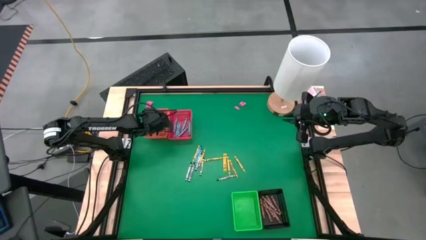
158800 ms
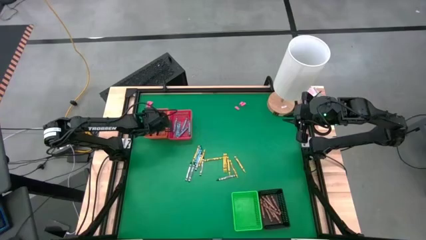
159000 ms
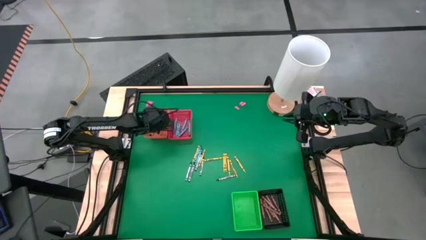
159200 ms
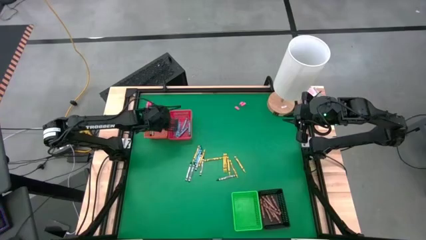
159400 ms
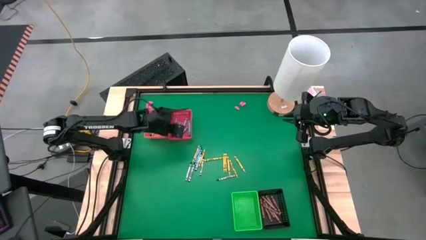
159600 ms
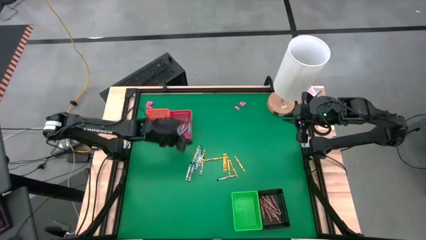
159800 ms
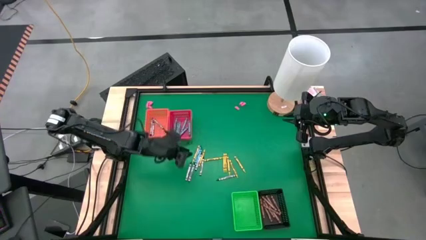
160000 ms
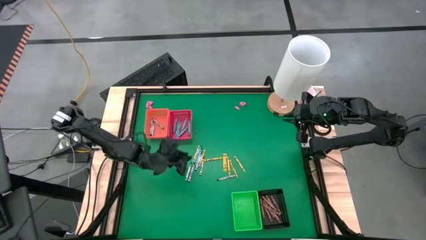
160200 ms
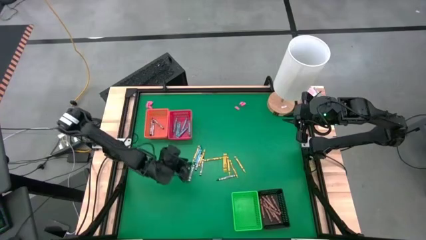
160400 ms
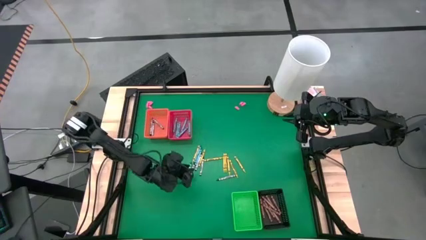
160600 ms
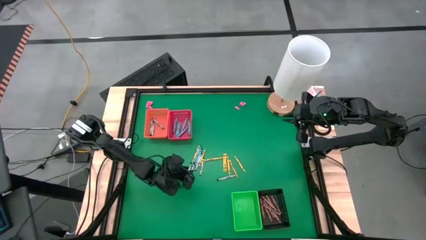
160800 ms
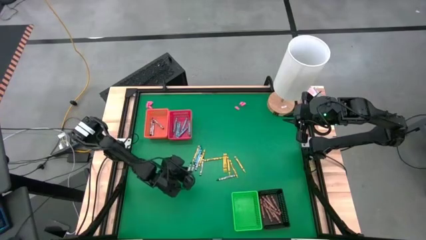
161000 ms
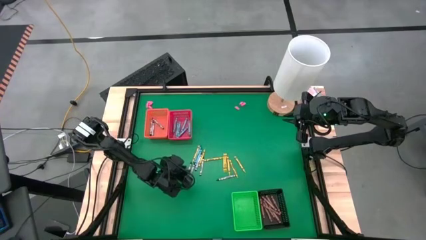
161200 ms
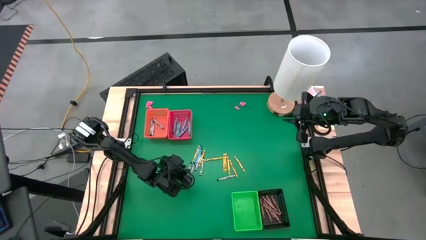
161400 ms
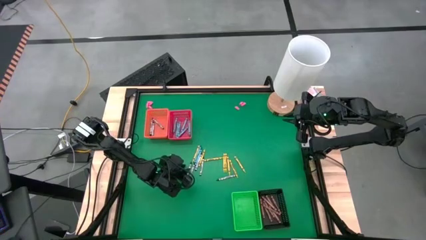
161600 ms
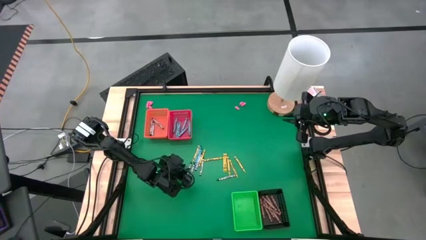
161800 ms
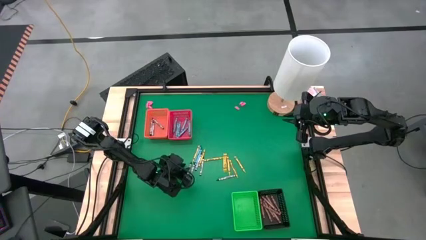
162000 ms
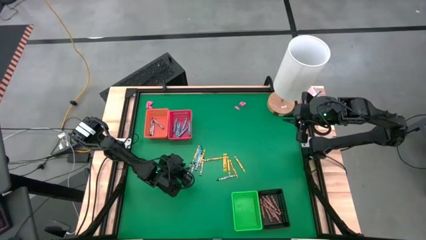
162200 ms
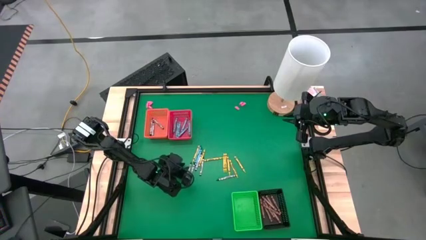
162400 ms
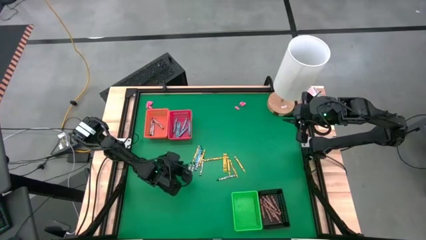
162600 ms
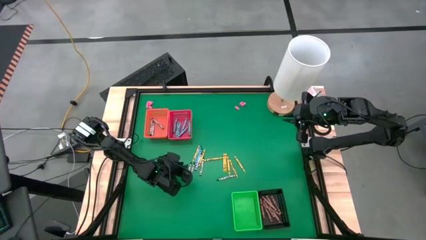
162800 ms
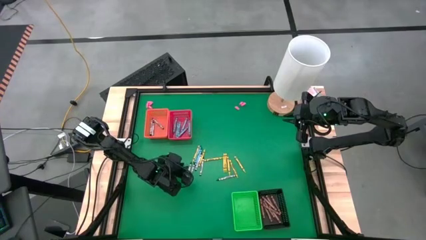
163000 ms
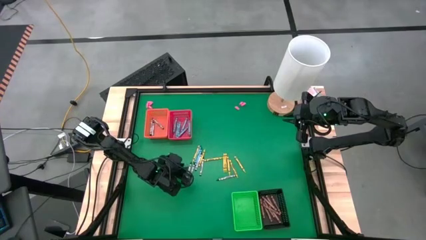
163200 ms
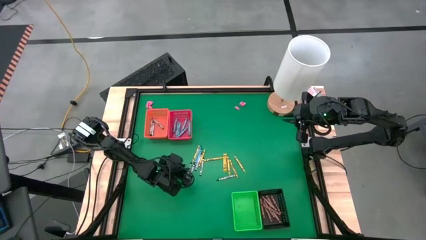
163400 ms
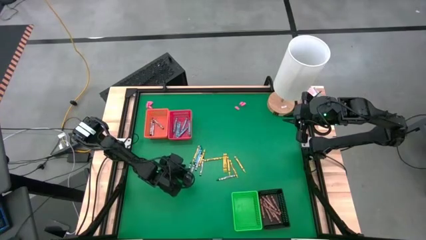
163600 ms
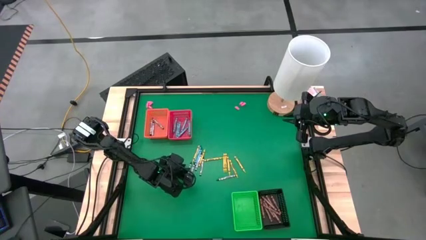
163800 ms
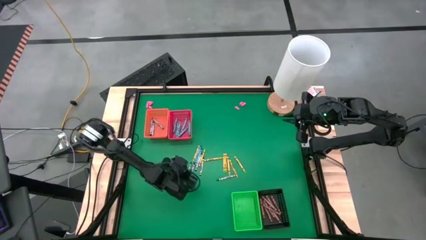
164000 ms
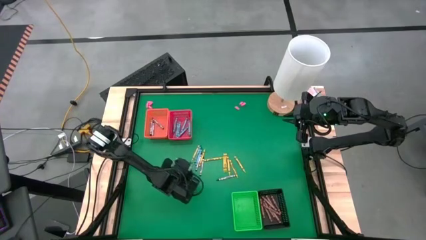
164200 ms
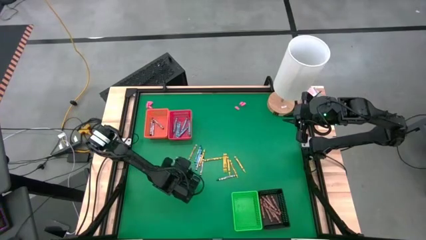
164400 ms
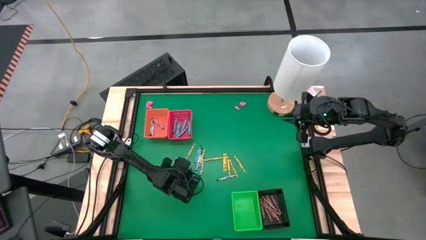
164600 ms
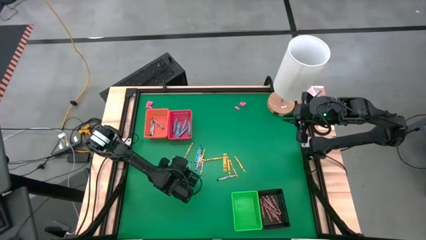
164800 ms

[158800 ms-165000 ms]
Task: Sort crayons
Put the black crayon into the orange bin

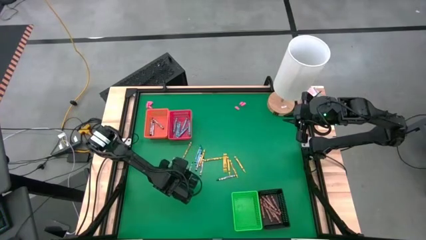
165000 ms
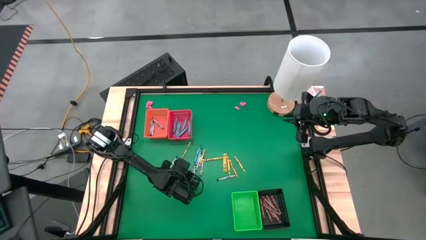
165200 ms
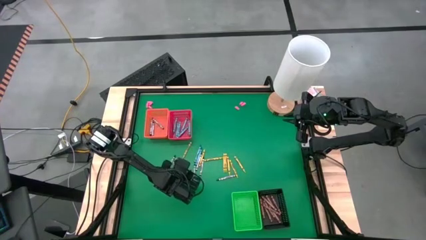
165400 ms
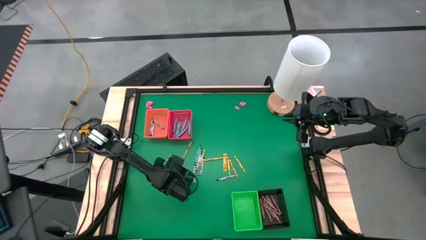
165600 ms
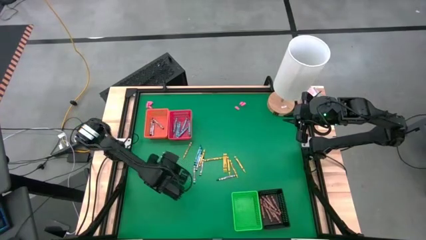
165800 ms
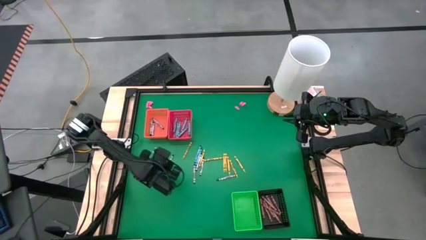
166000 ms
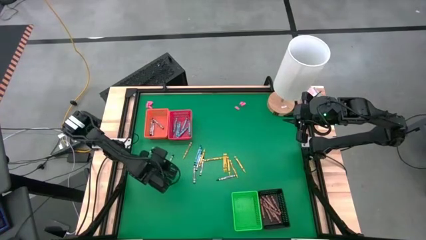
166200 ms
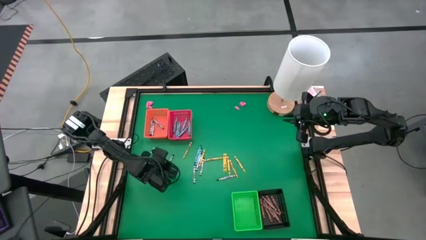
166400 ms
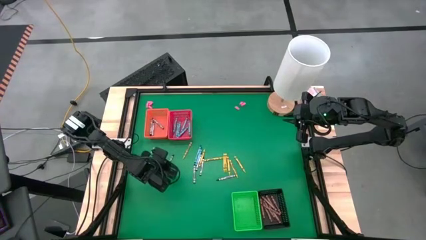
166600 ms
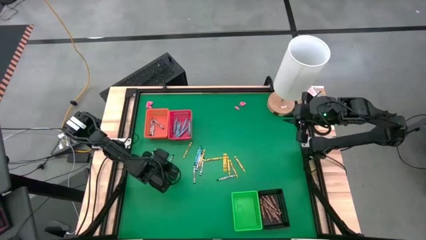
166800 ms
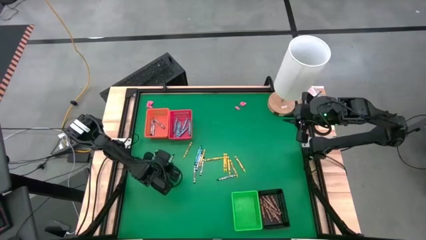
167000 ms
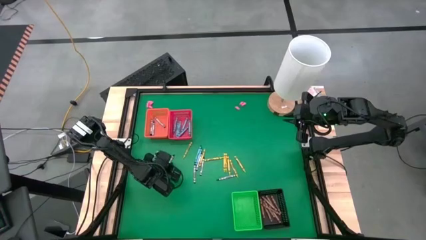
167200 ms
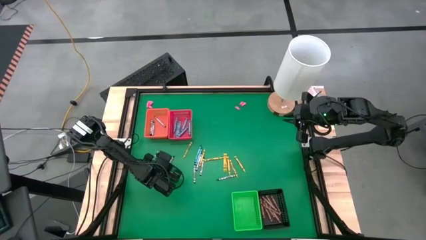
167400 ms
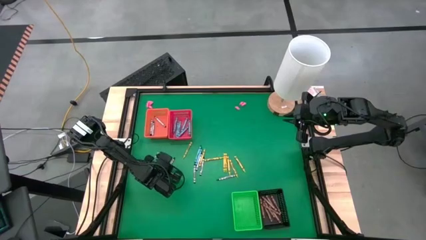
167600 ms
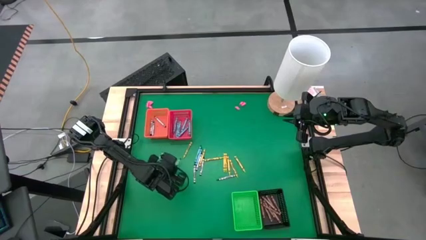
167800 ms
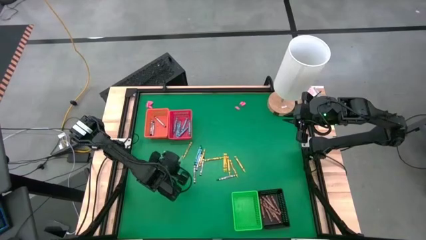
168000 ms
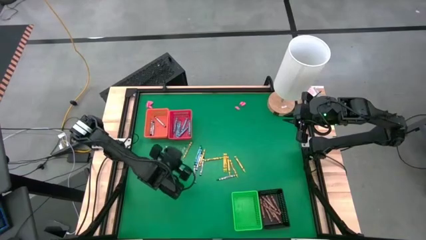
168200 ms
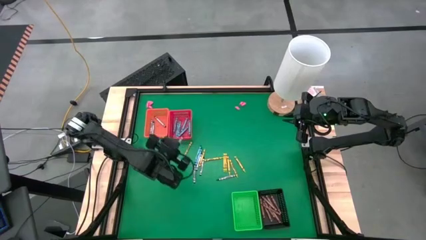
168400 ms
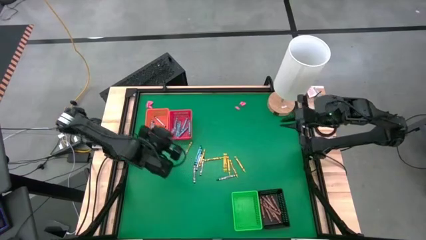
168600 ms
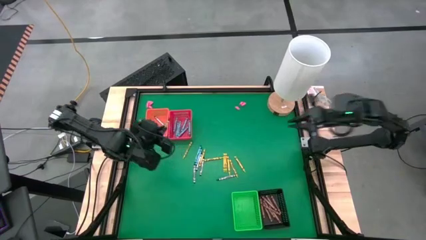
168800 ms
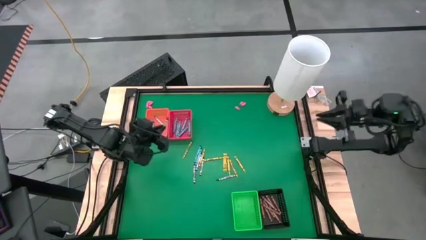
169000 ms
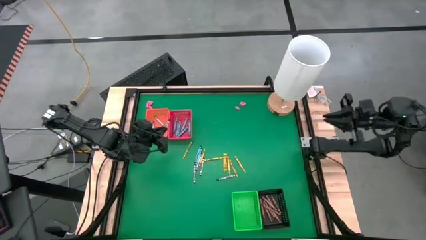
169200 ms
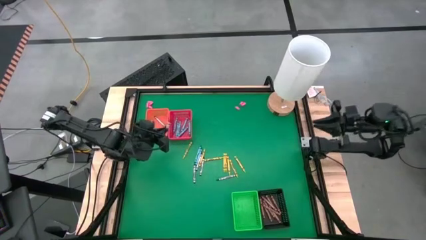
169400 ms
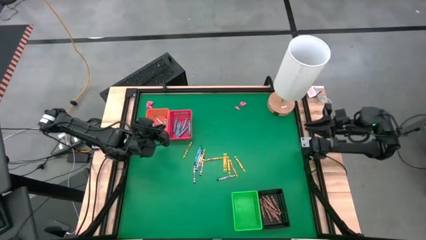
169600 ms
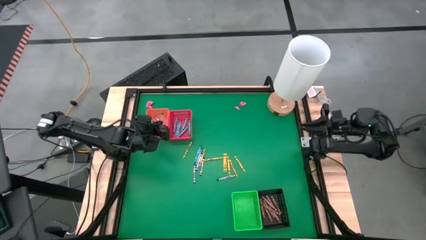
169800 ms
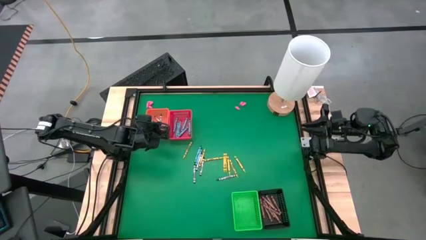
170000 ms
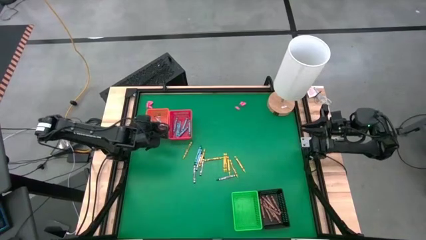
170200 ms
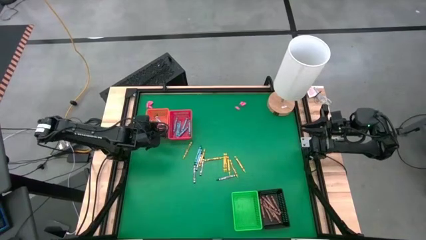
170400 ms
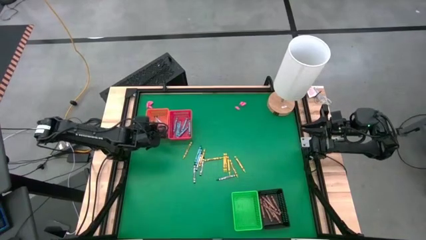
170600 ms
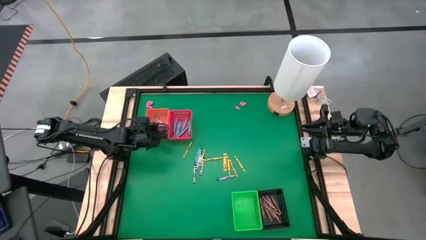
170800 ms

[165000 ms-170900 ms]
Put the black crayon into the orange bin

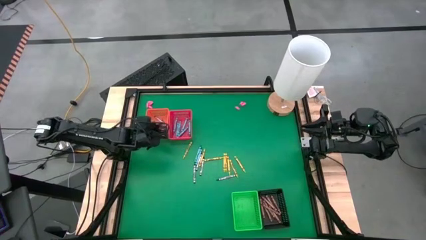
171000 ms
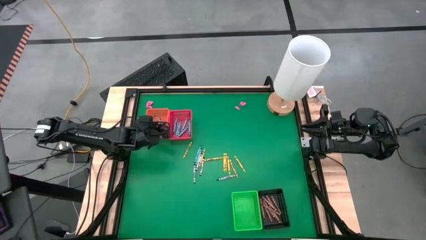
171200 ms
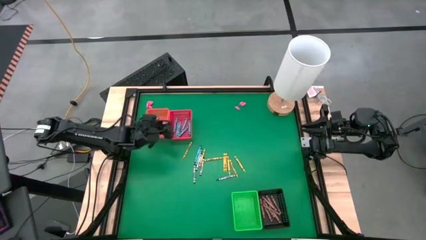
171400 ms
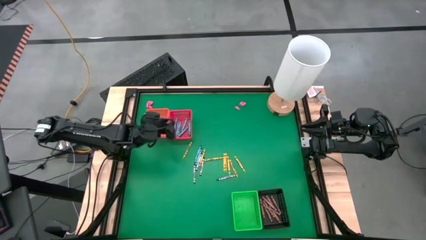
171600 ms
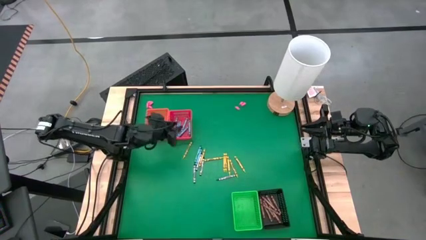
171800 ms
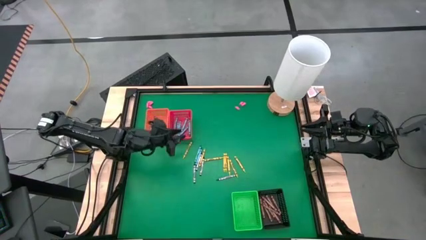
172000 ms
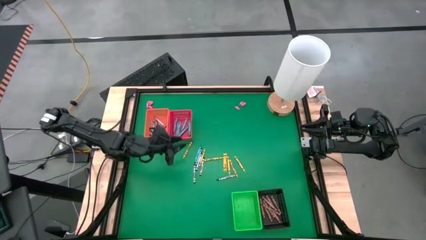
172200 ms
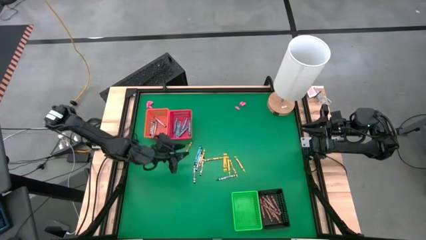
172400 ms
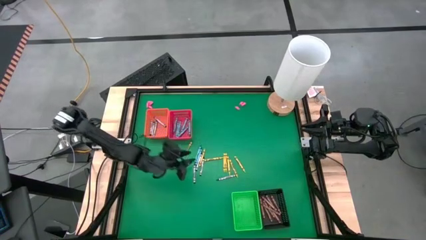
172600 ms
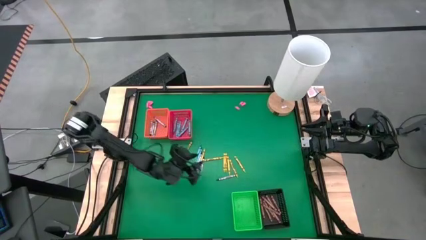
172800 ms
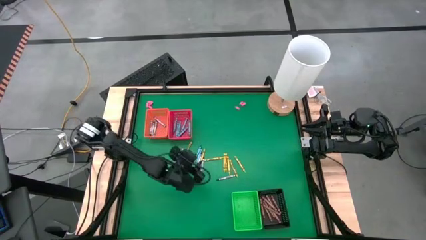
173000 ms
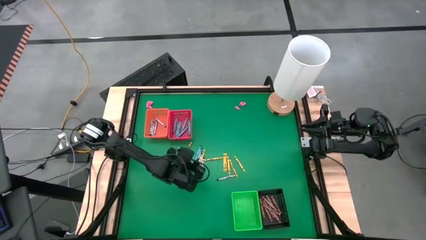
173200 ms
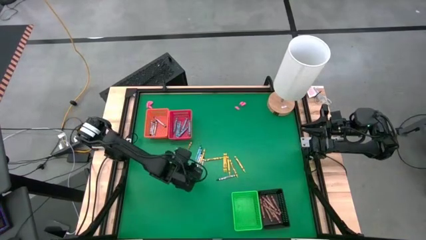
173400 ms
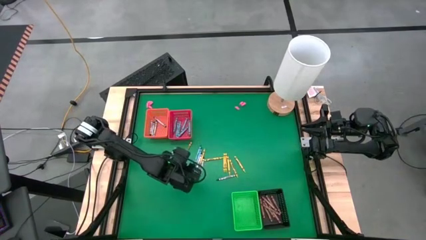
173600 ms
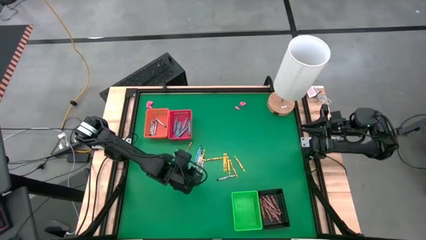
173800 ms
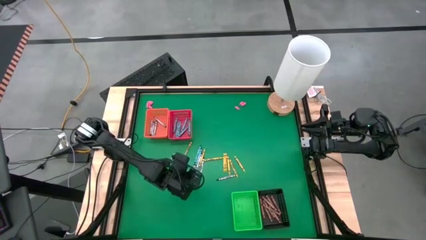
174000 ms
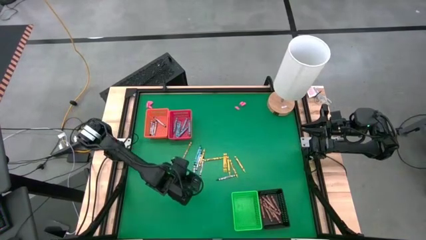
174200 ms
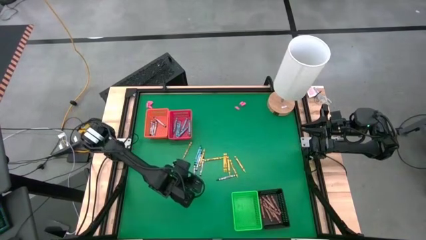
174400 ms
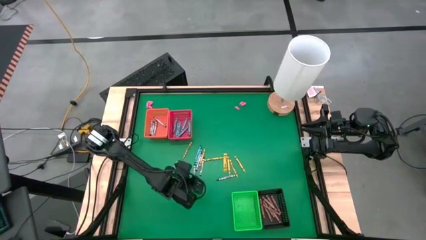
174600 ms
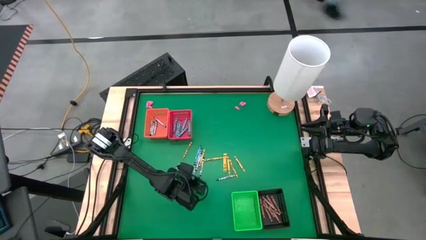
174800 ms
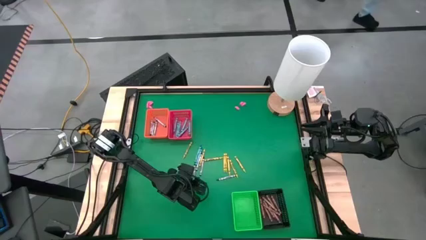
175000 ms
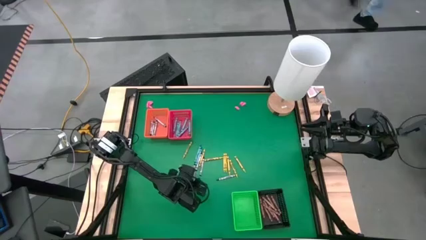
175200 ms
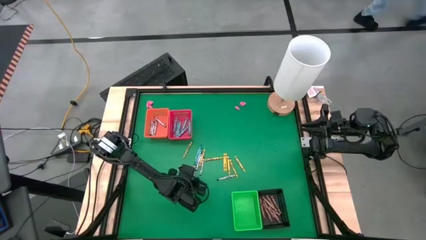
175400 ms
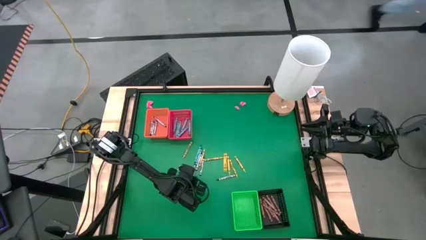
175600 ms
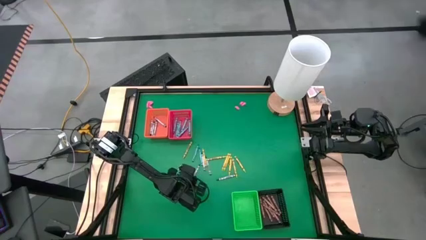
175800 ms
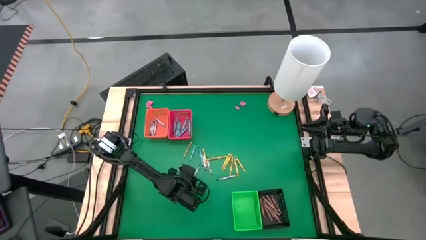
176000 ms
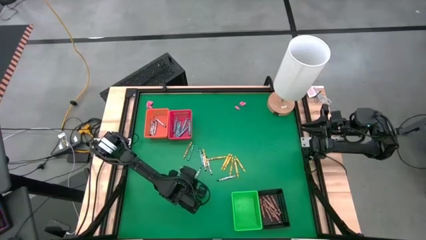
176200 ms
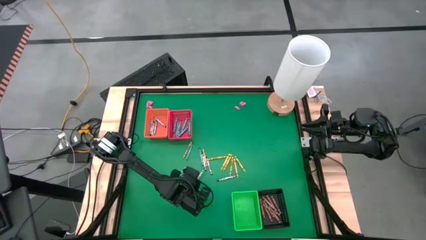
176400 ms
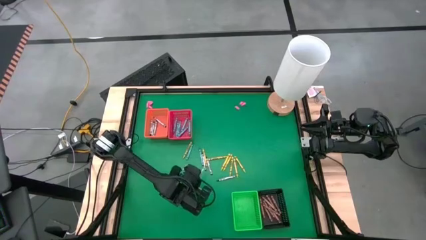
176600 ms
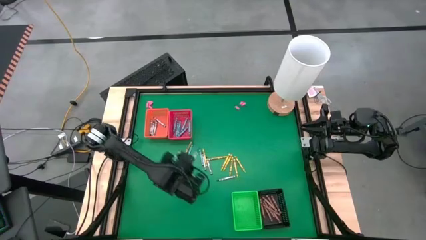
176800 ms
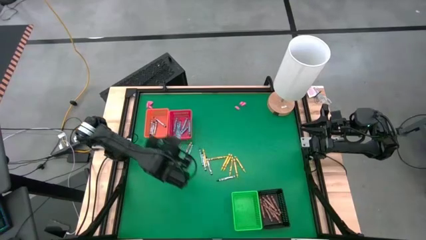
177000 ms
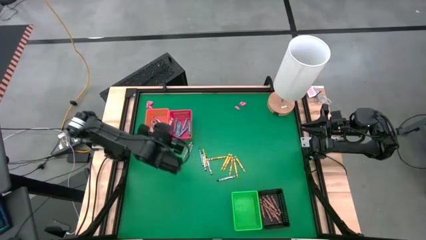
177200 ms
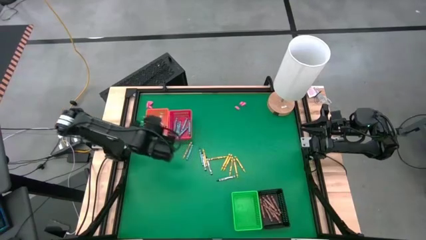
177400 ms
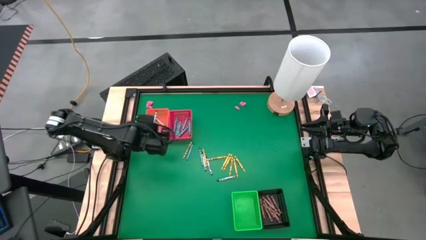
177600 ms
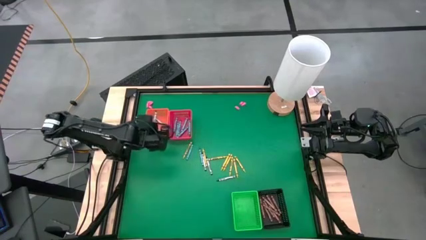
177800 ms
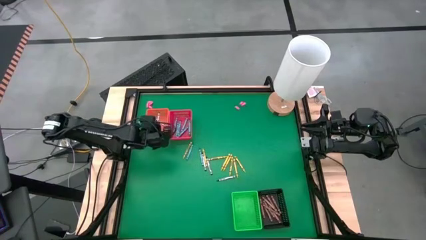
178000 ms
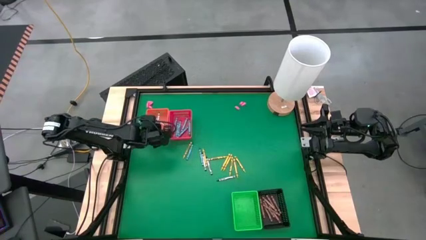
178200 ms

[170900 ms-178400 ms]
Put the black crayon into the orange bin
